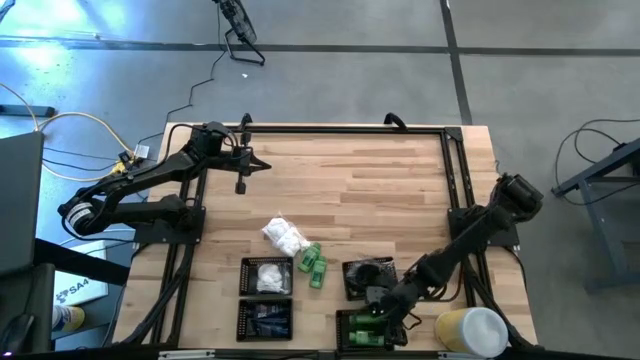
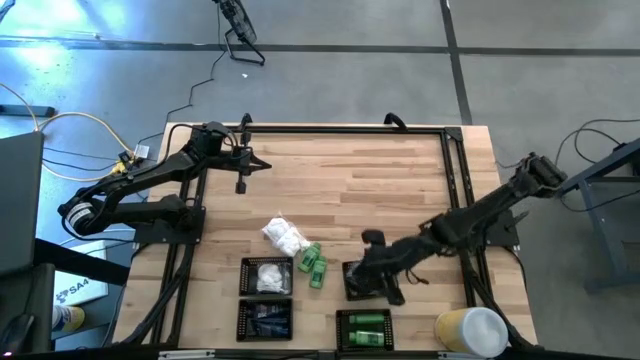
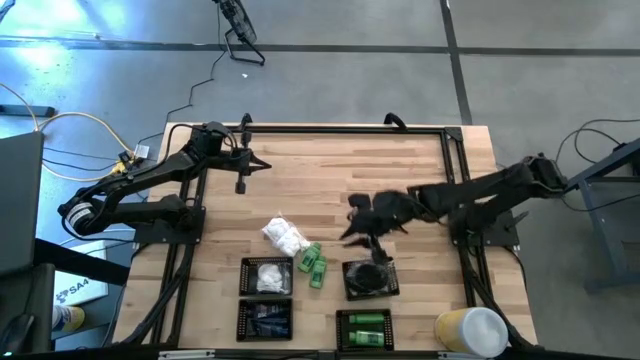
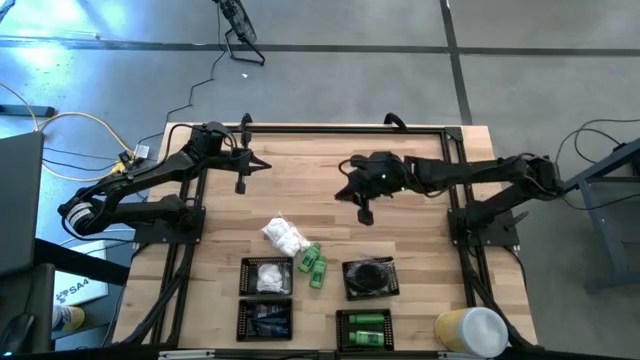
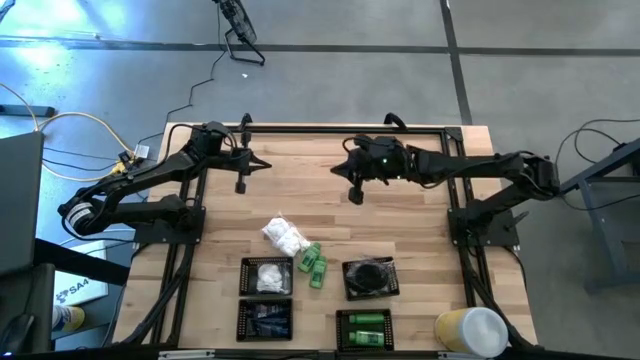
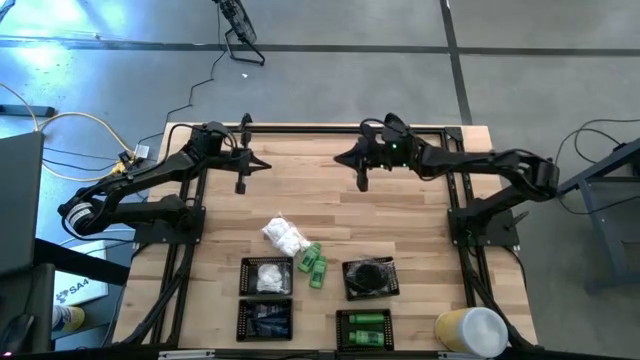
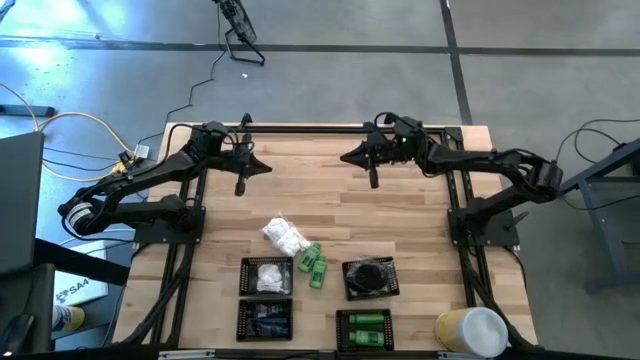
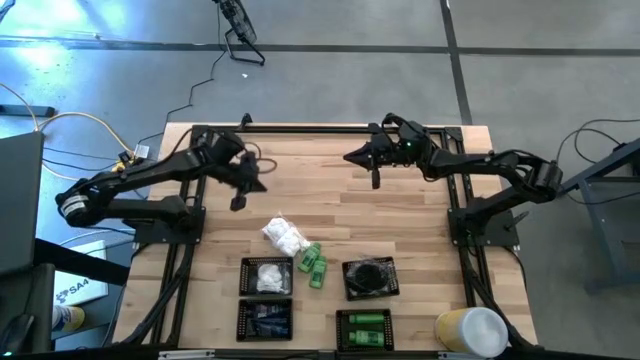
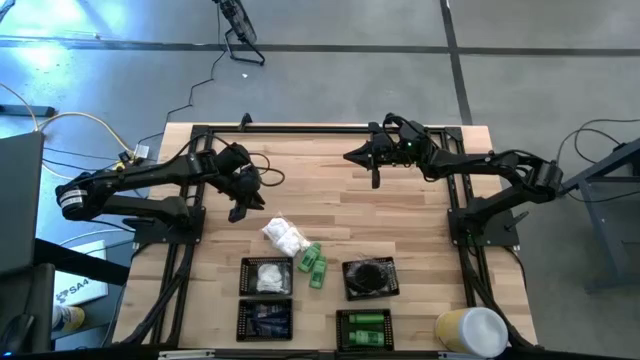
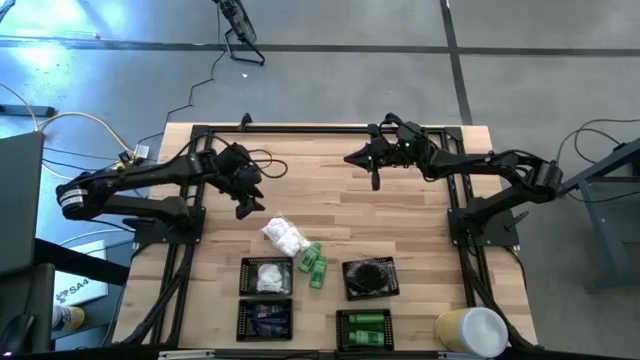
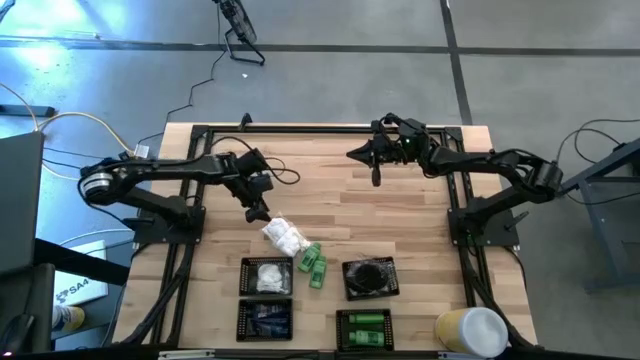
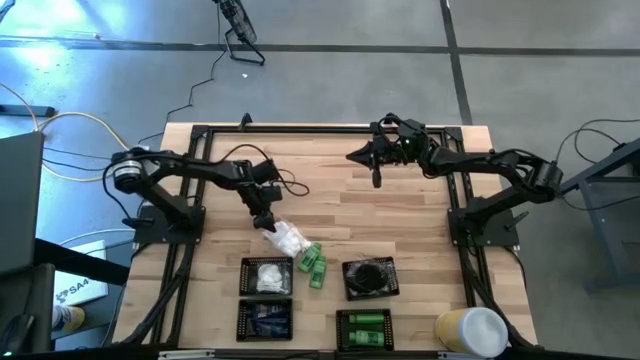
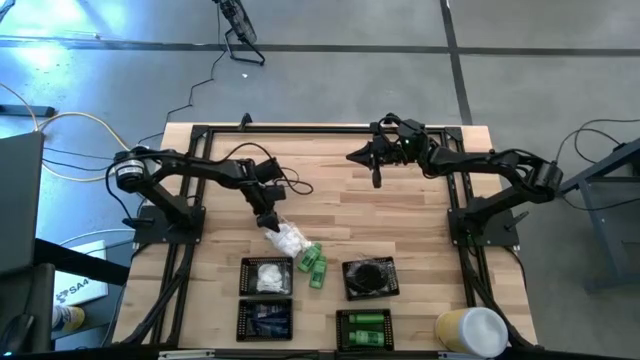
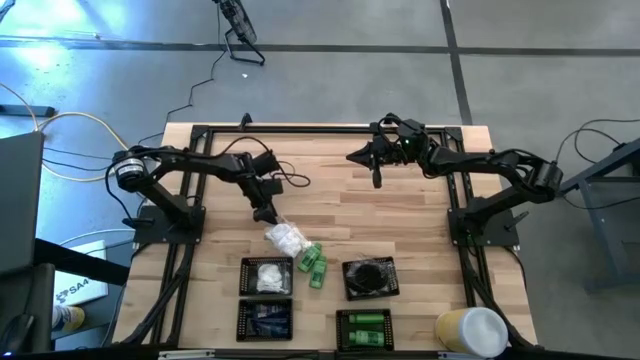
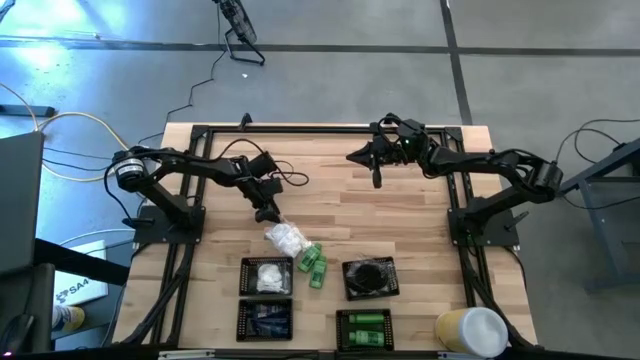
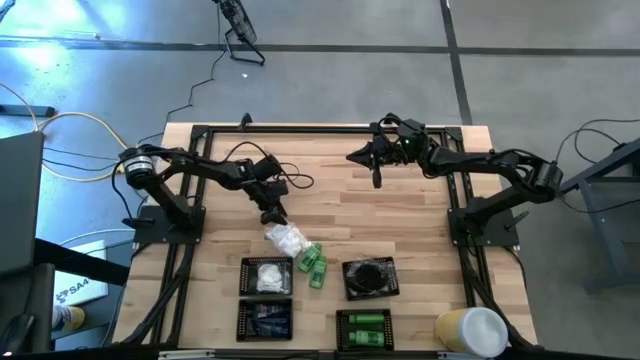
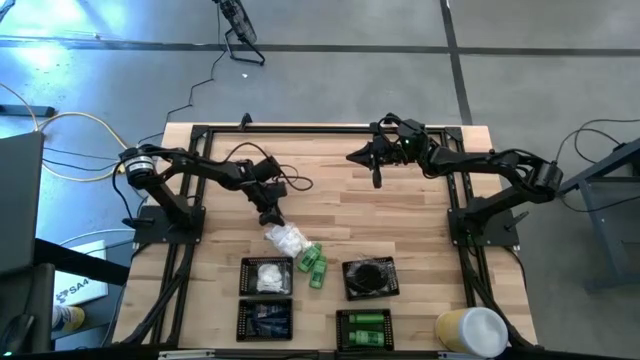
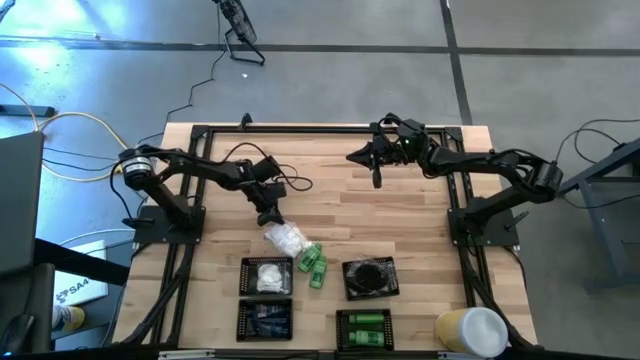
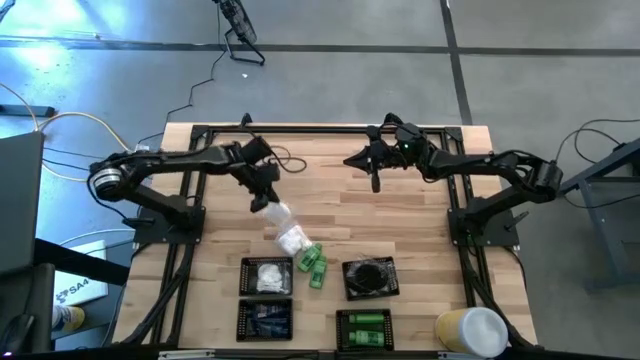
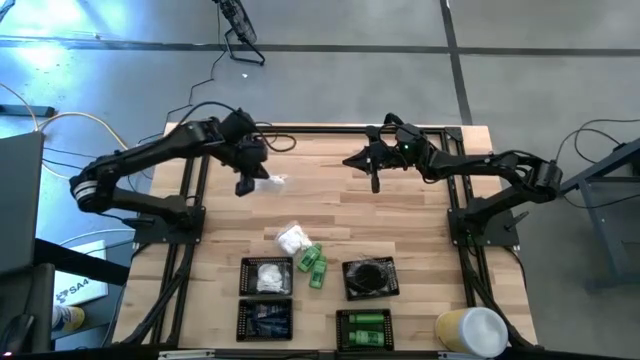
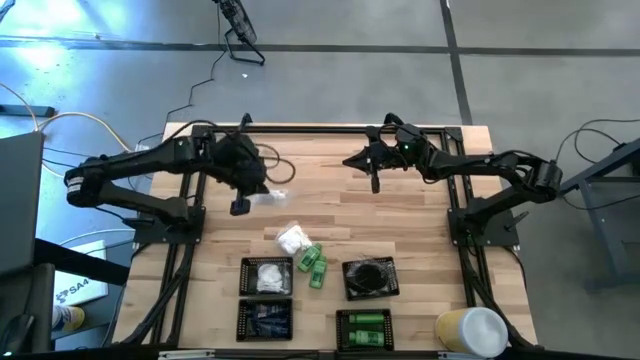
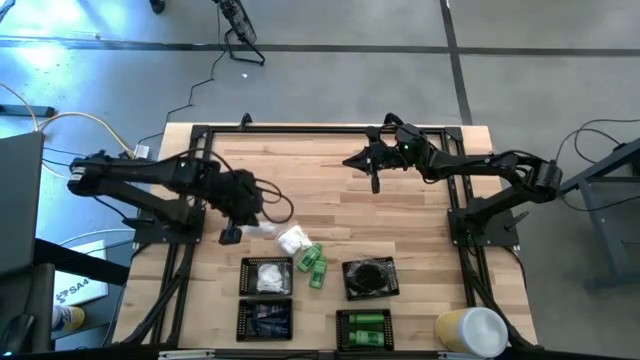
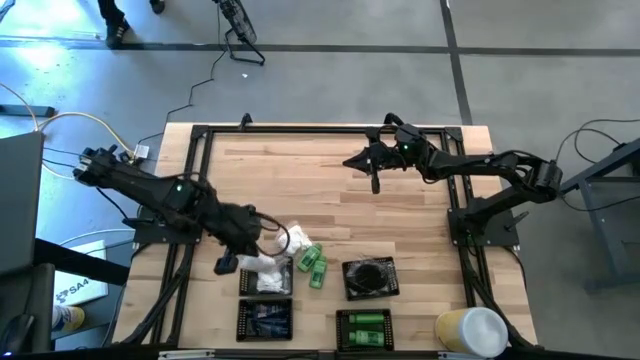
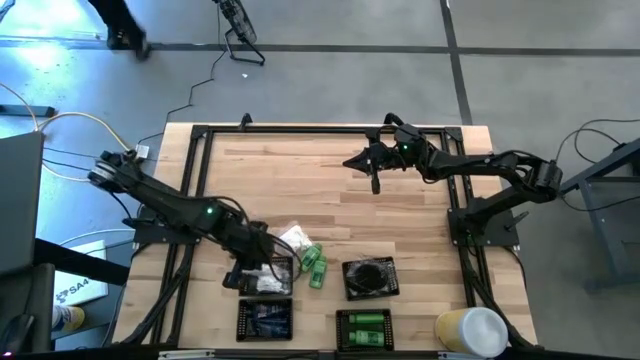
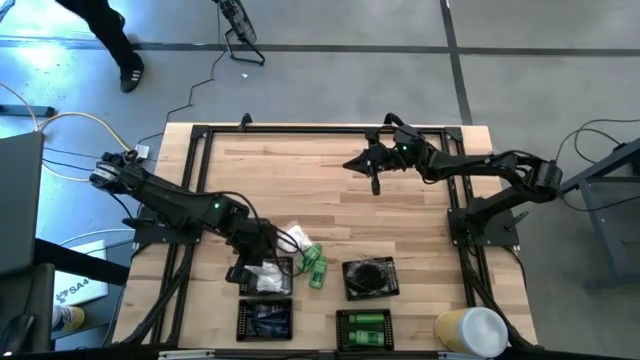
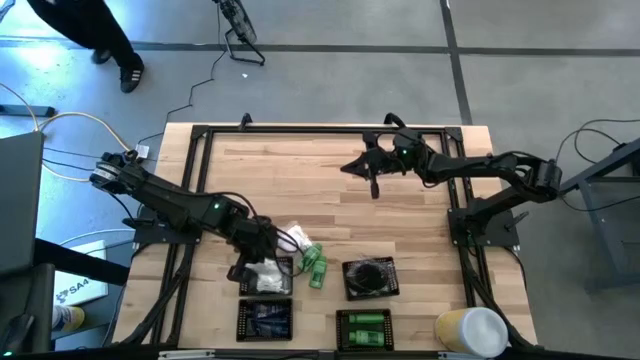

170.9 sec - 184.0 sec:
Task: Pick & Place Travel size toiletries
Put the white cotton pack into the top left black bin

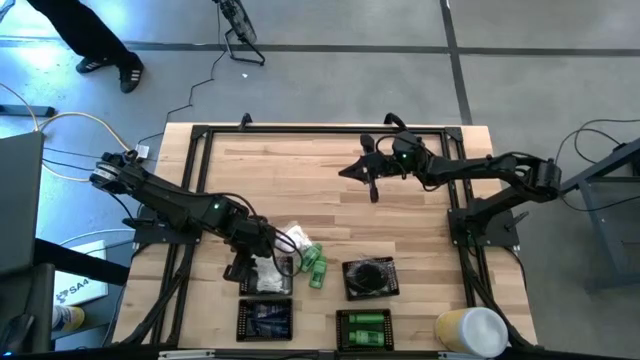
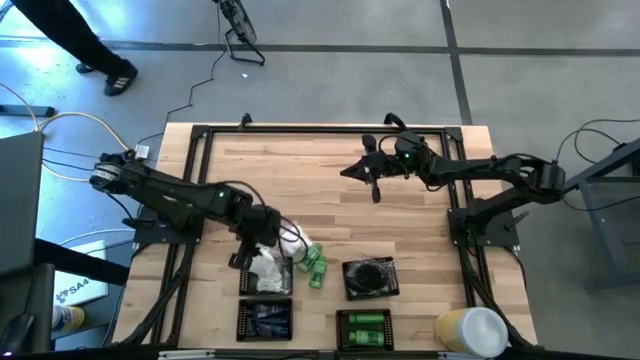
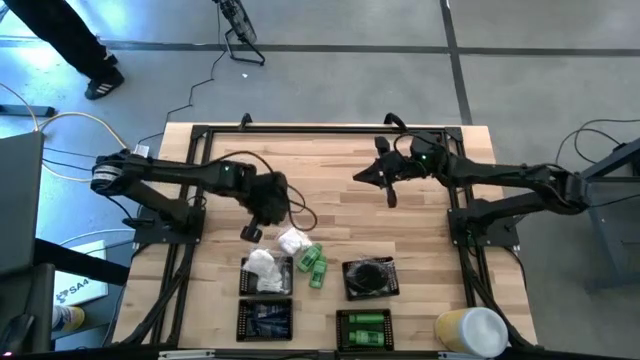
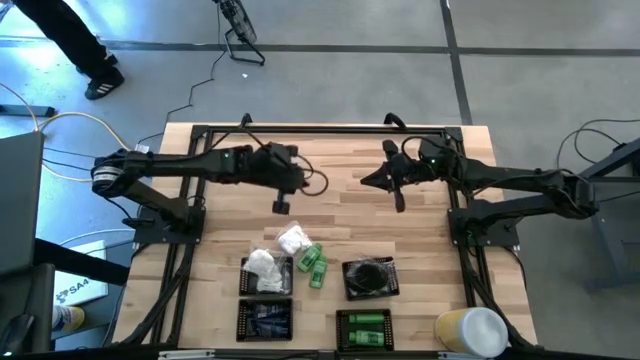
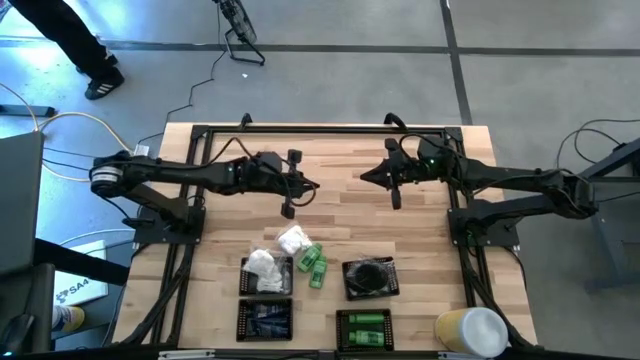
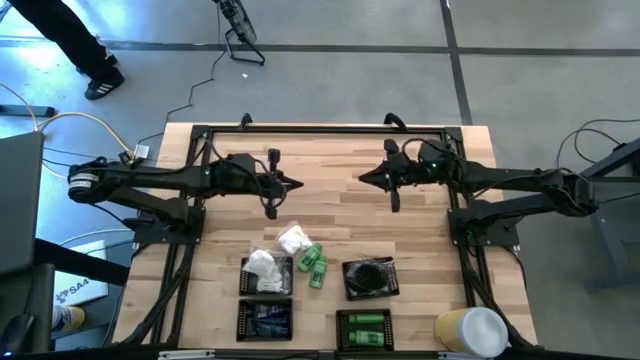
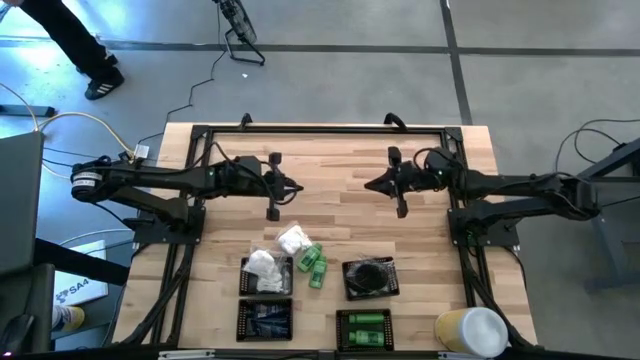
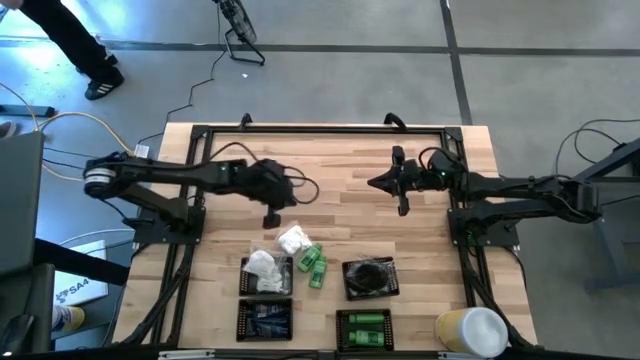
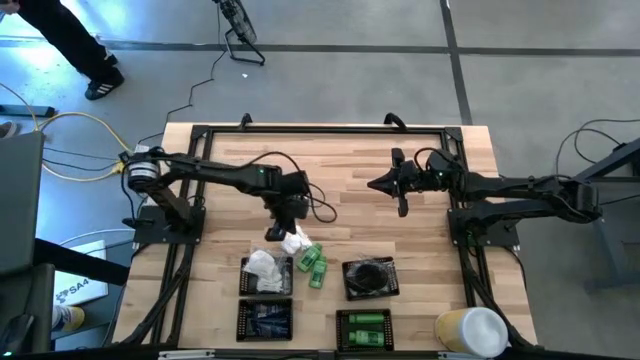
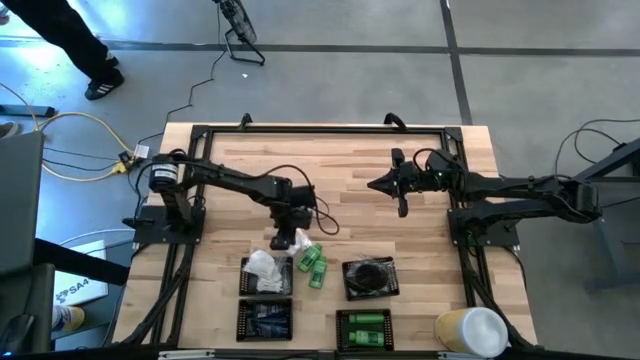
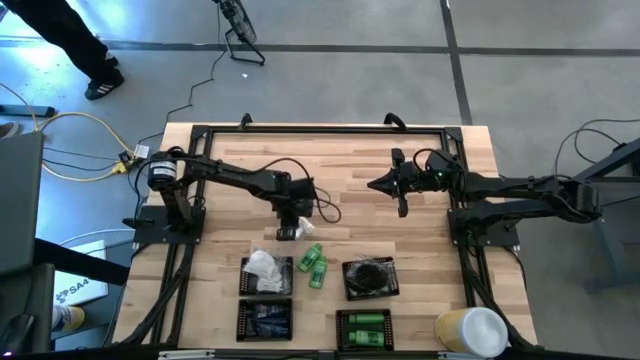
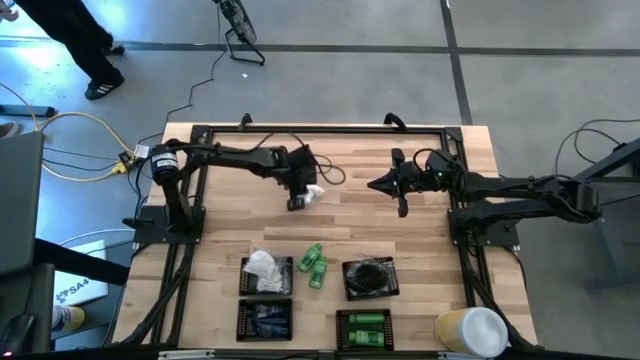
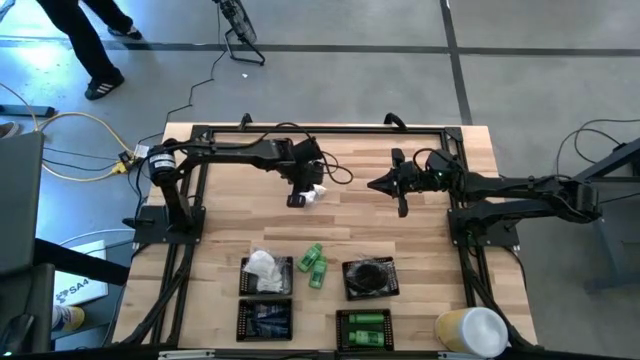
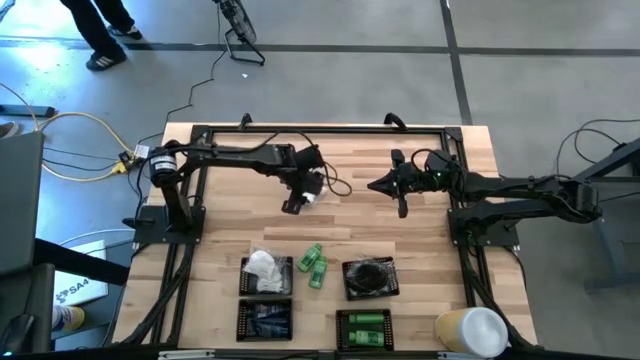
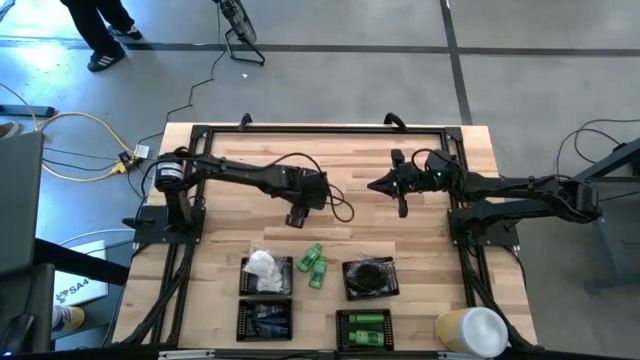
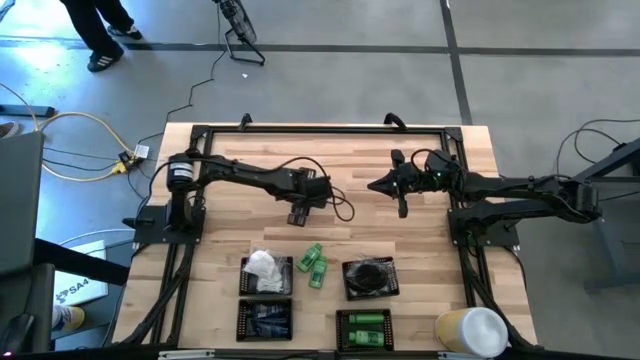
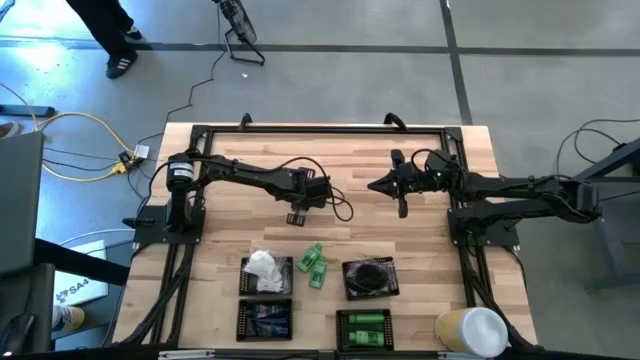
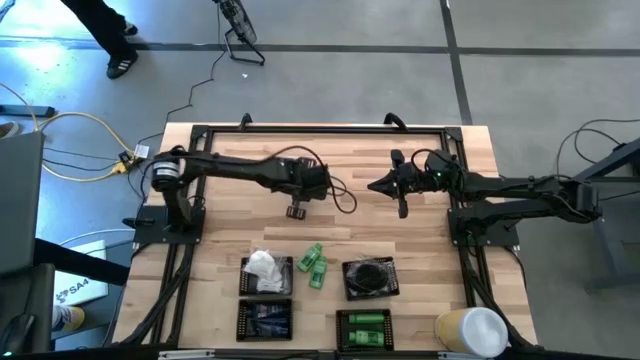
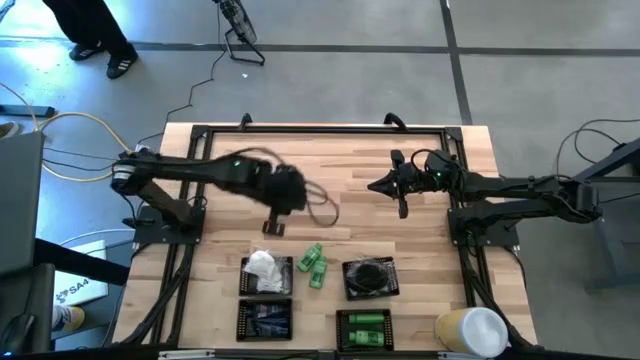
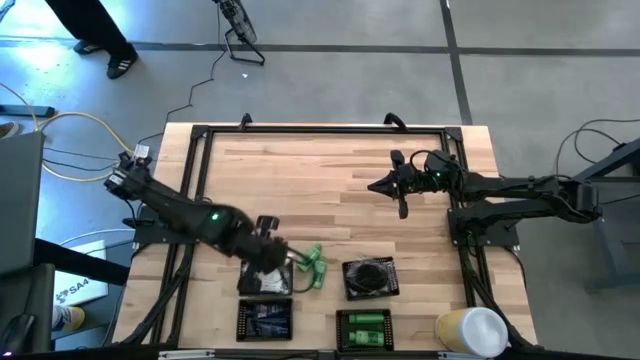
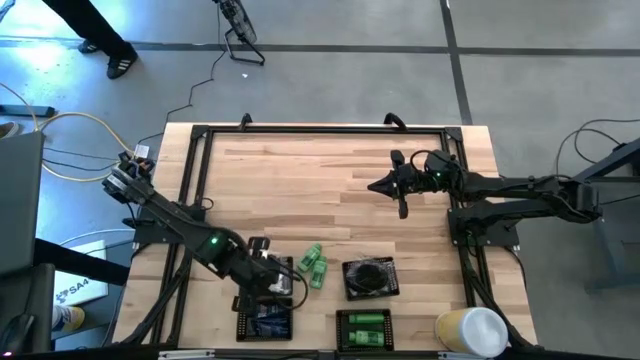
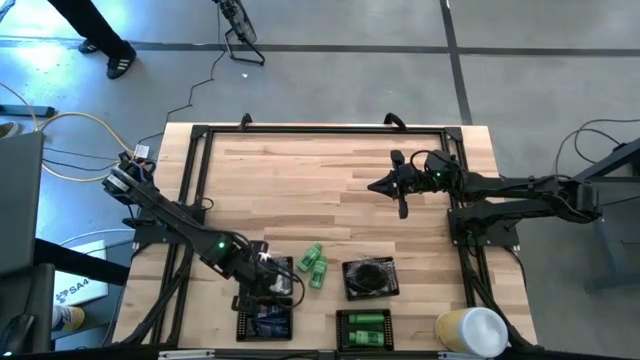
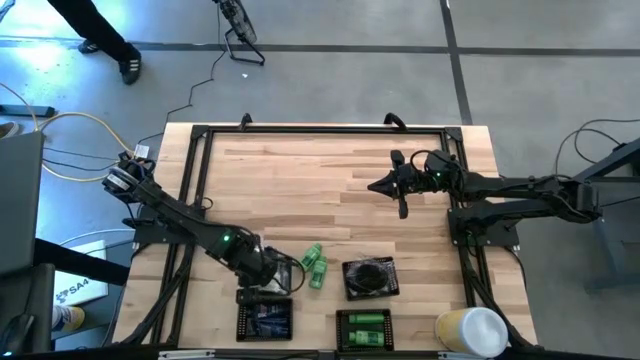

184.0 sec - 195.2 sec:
Put the white cotton pack into the top left black bin
